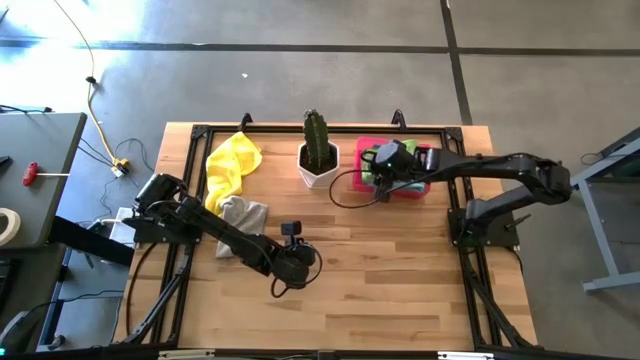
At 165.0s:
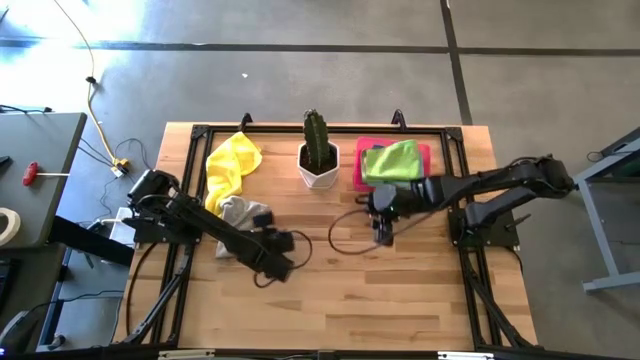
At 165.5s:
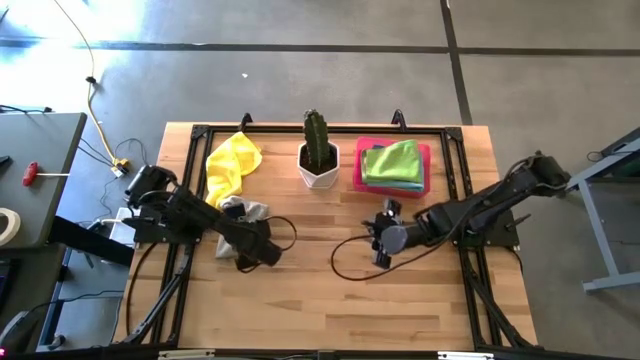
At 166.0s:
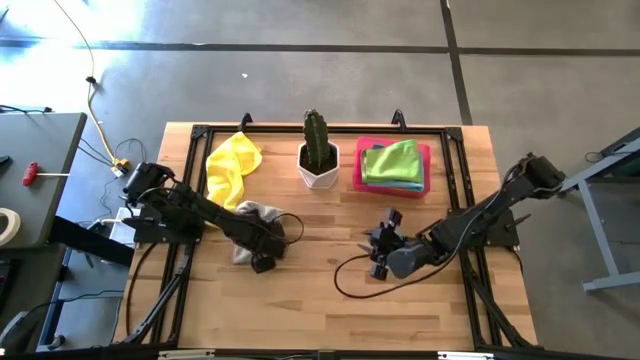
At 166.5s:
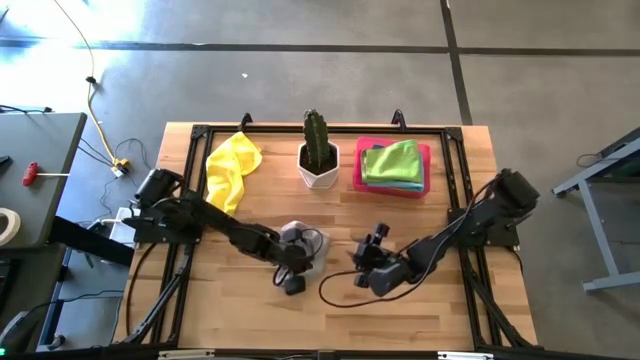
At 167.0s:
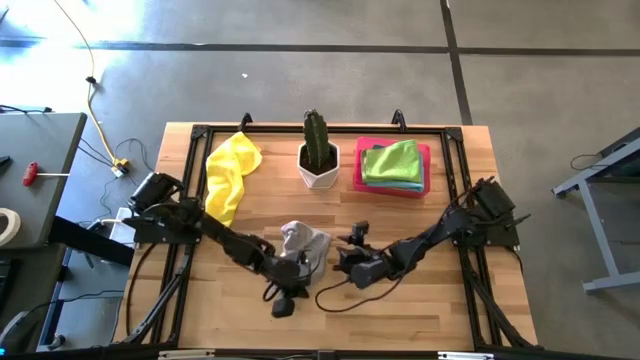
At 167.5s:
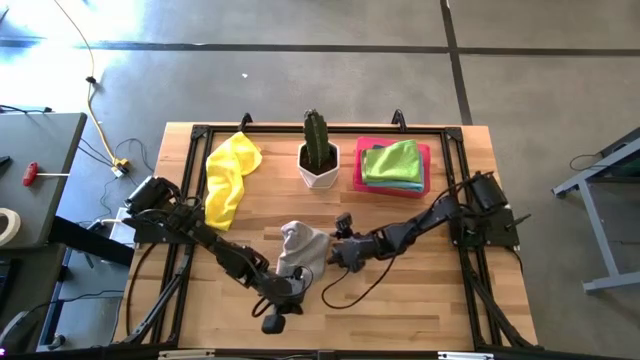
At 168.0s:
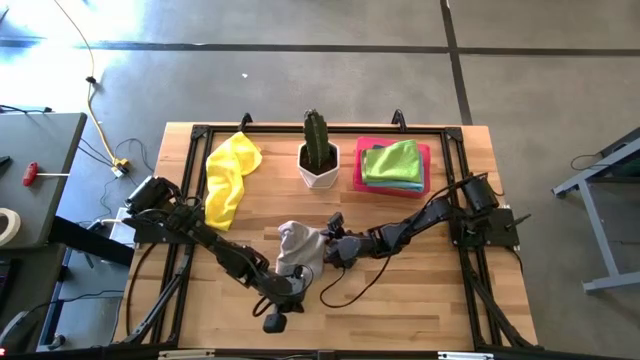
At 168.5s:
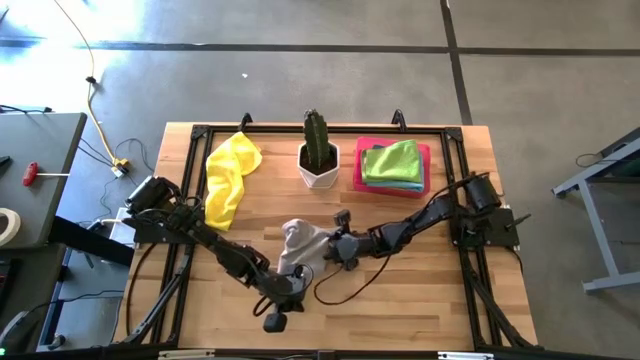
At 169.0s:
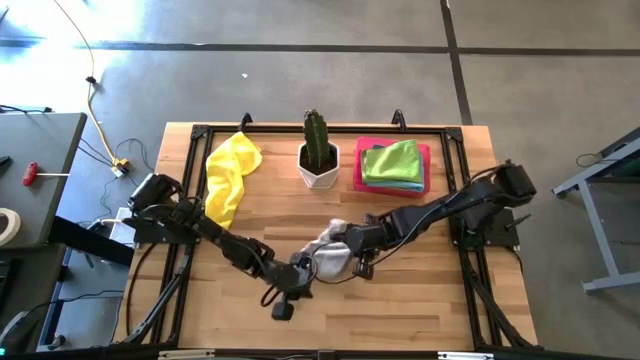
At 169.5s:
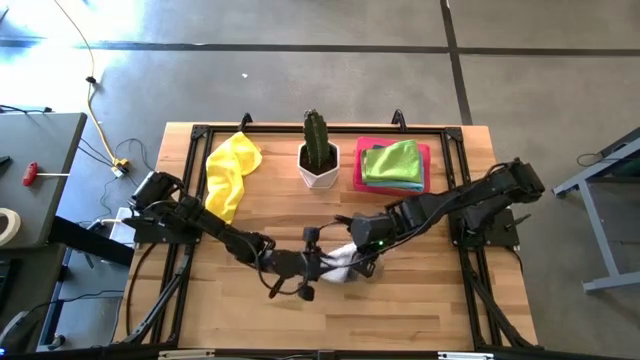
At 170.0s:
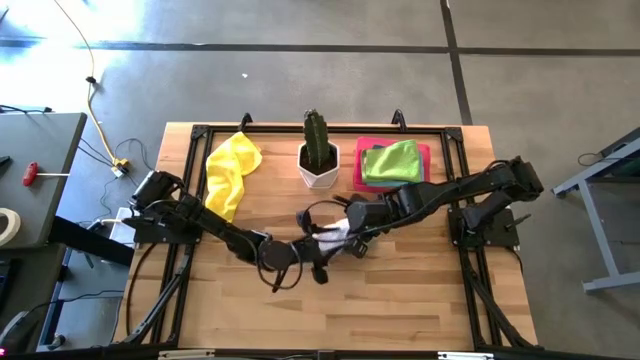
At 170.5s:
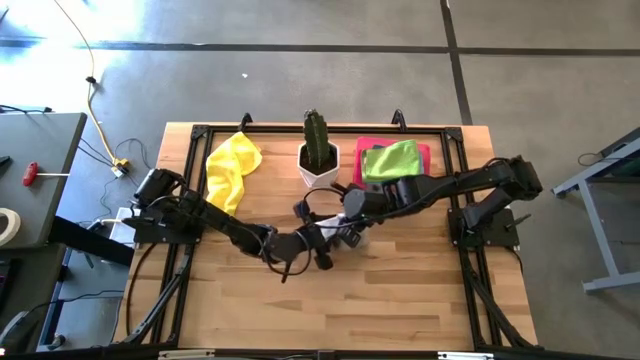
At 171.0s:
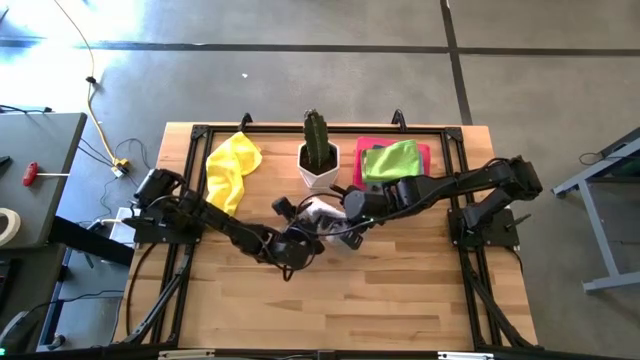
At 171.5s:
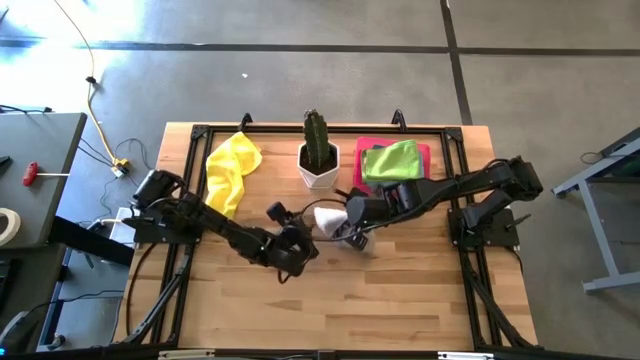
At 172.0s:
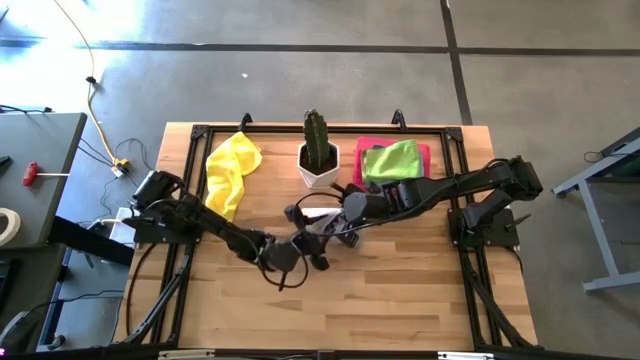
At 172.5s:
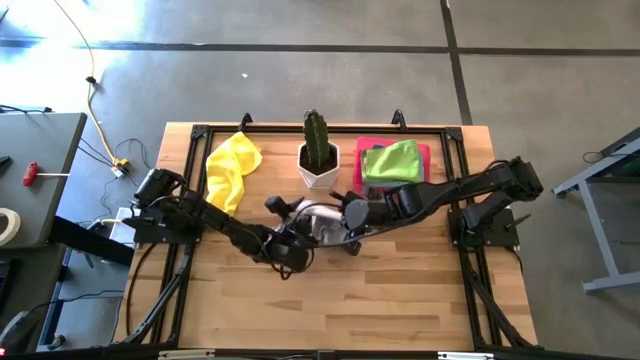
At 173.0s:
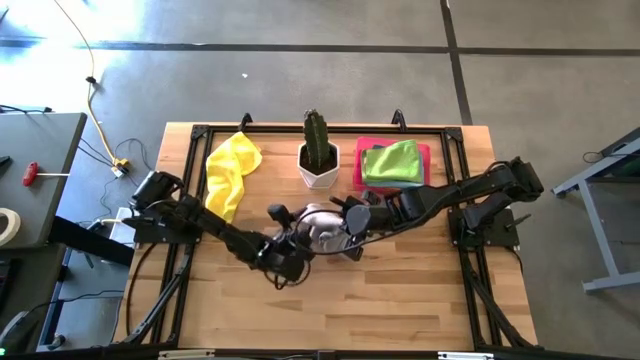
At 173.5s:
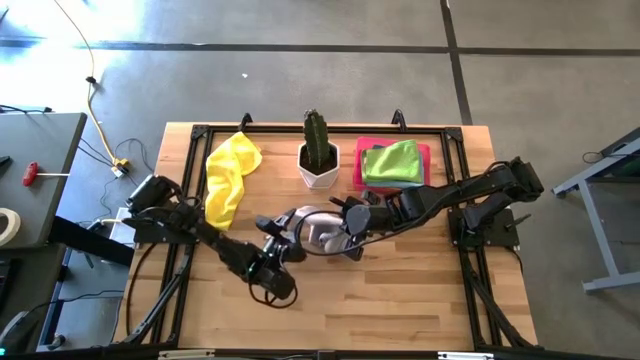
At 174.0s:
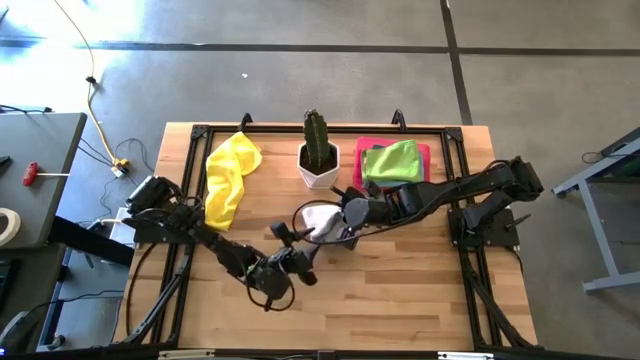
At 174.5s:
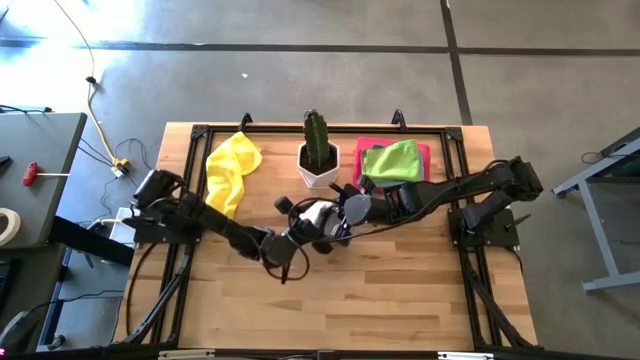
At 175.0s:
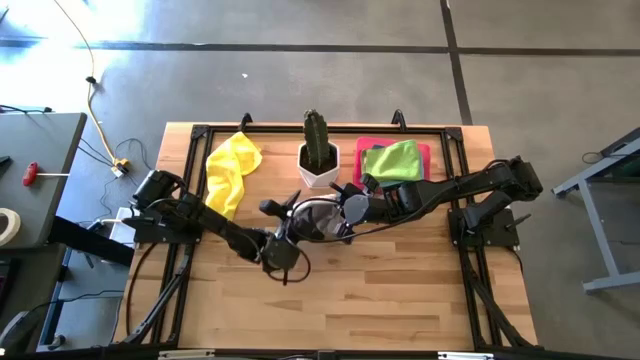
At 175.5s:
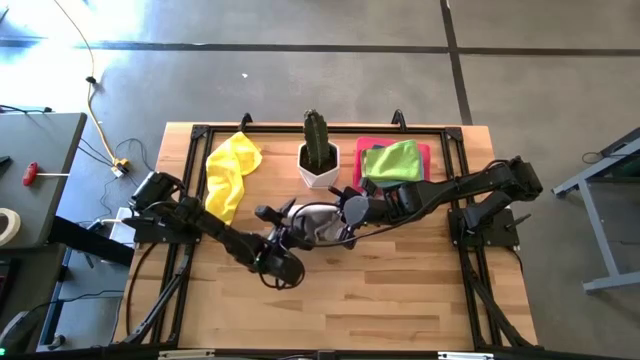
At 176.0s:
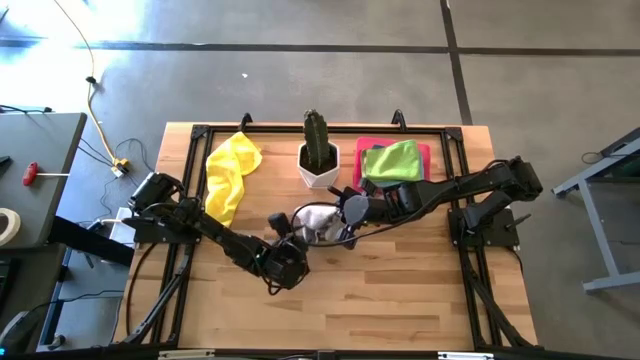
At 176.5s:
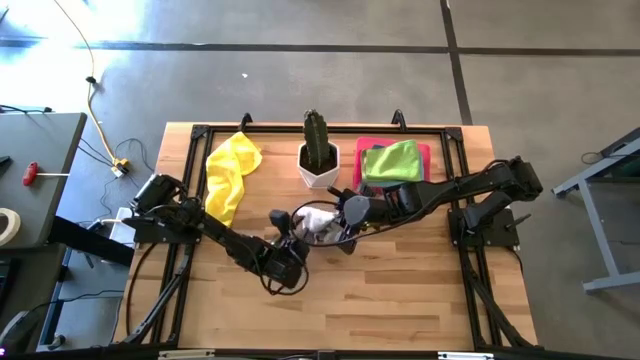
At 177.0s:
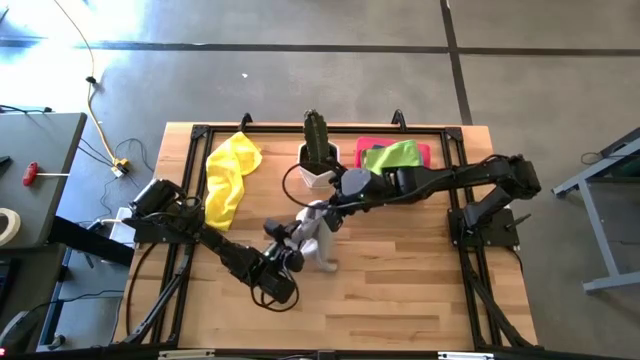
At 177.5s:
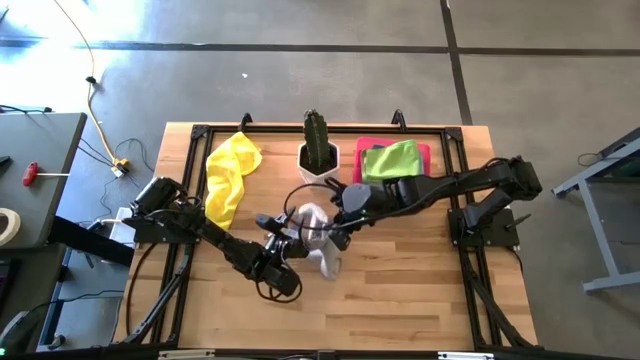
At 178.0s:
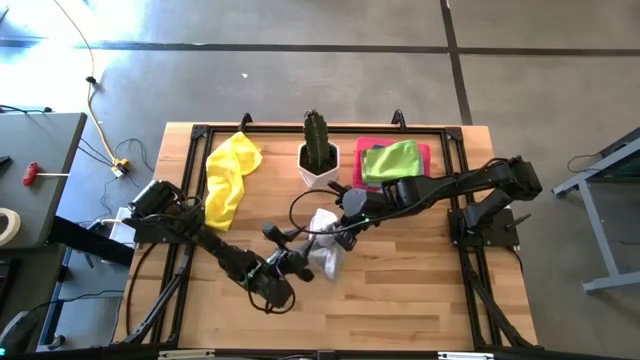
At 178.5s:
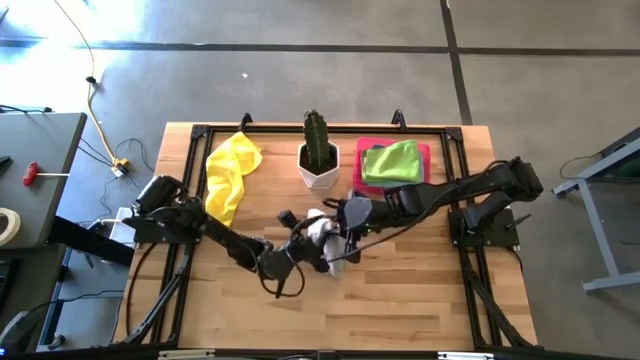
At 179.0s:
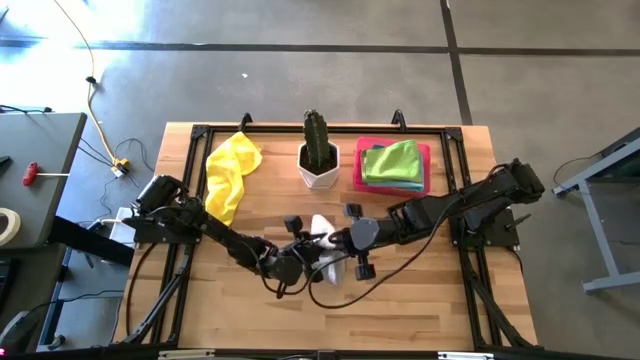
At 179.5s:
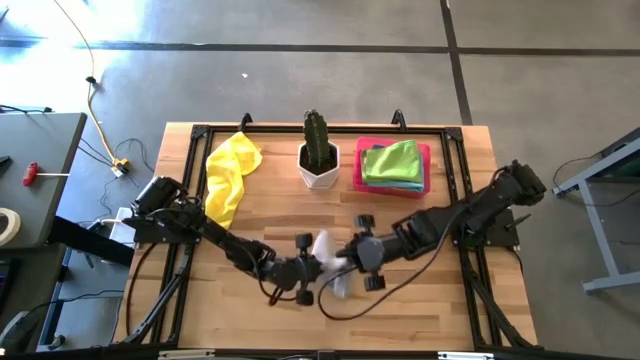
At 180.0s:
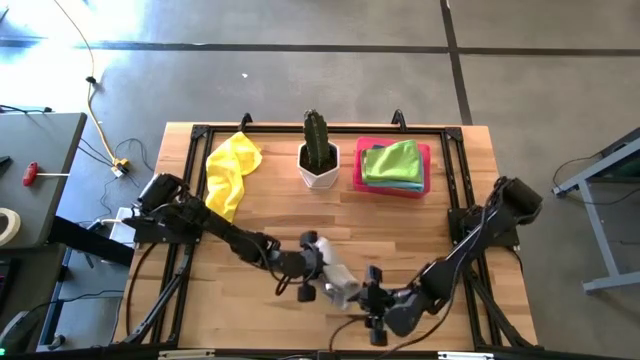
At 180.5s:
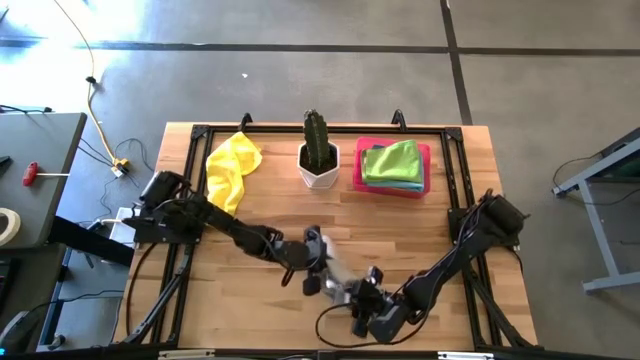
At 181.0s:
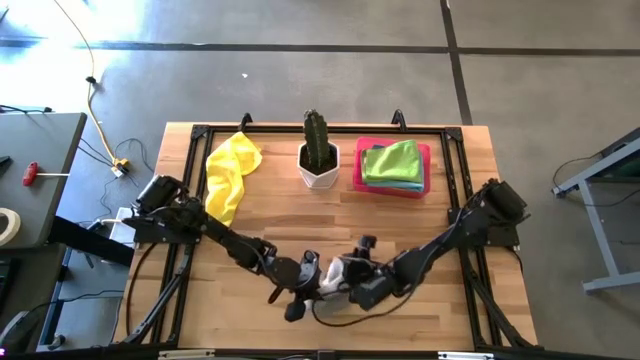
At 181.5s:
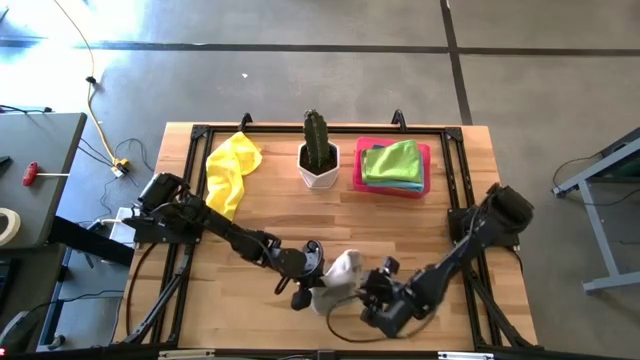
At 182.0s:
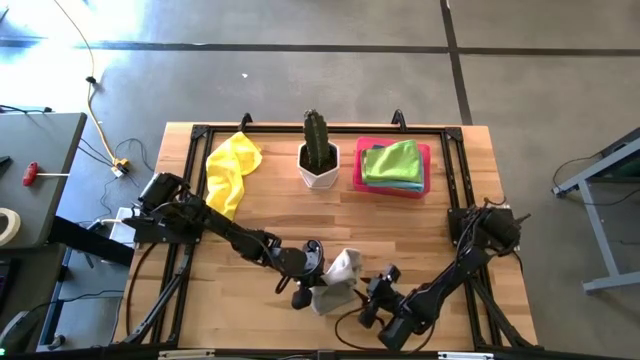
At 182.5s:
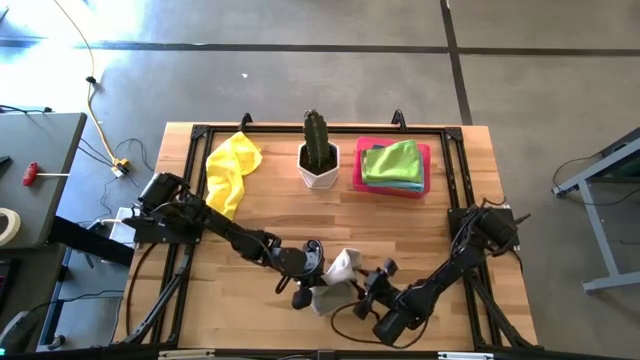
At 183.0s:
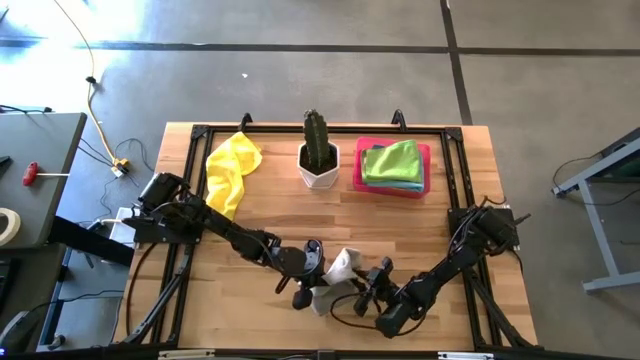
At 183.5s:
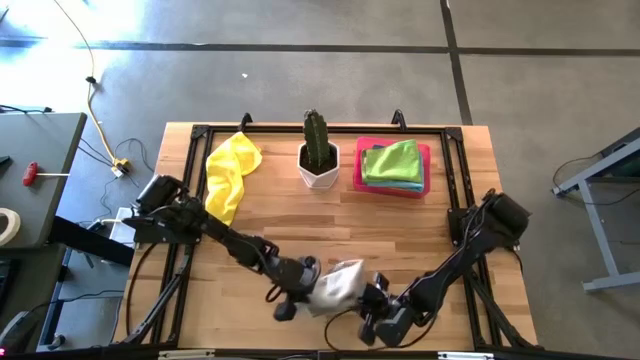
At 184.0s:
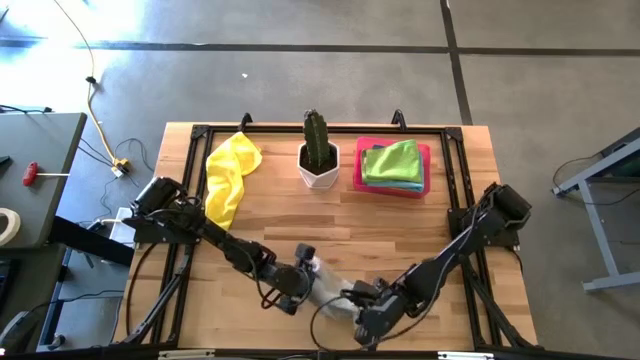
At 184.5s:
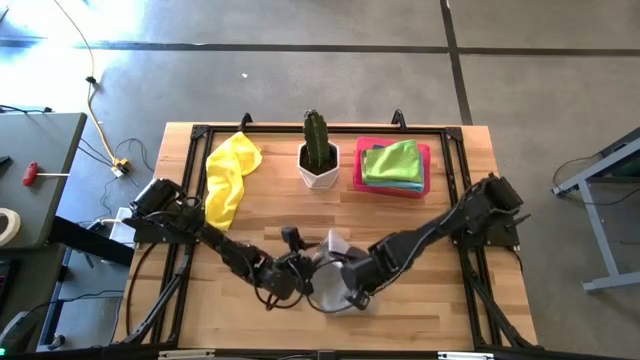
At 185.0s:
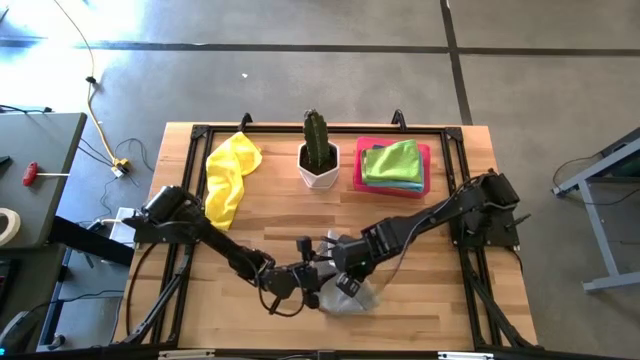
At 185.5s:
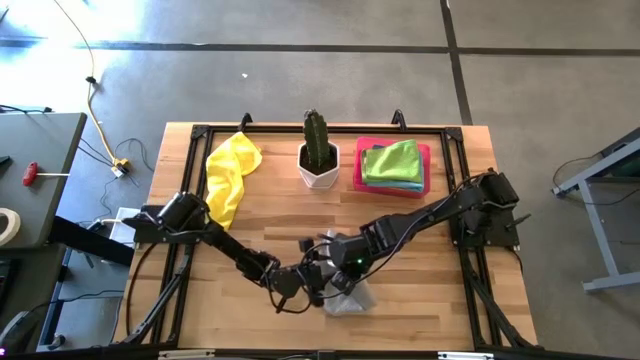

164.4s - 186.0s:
Task: Fold microfiber towels
Fold the gray towel
